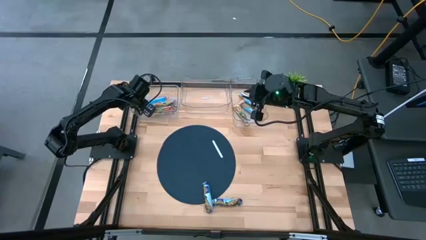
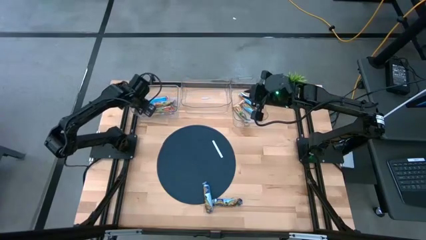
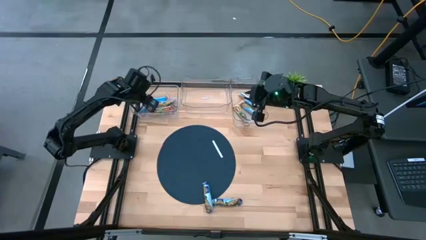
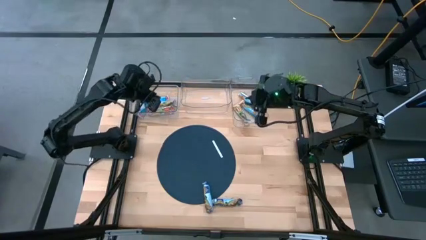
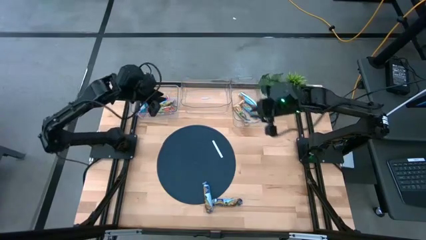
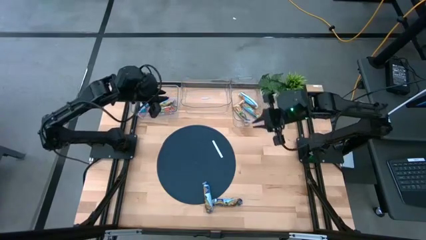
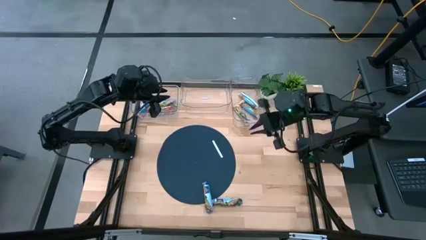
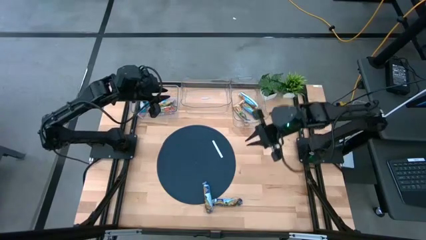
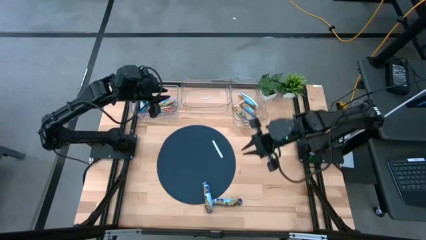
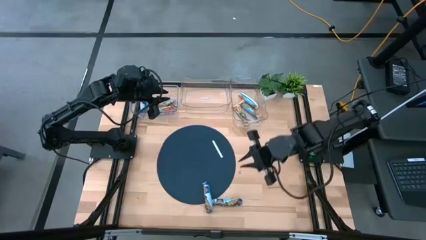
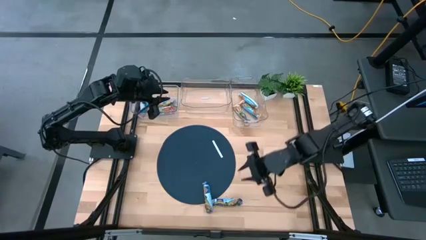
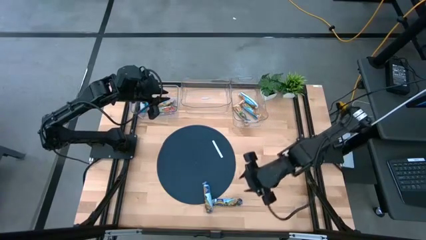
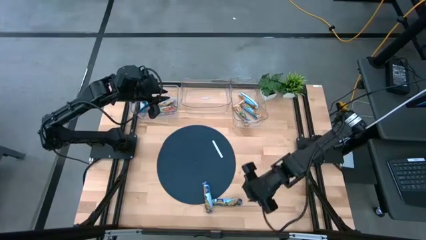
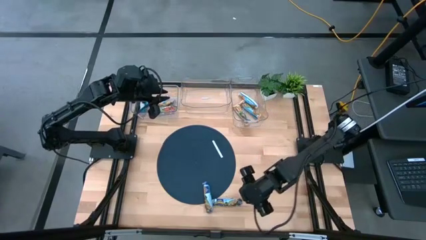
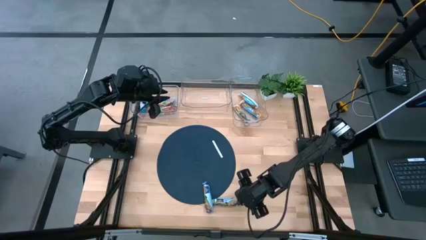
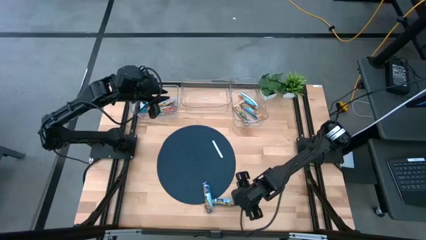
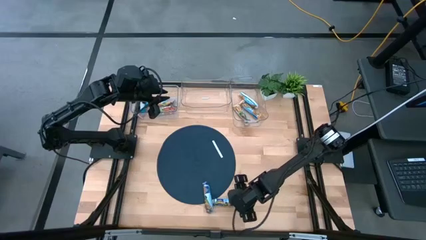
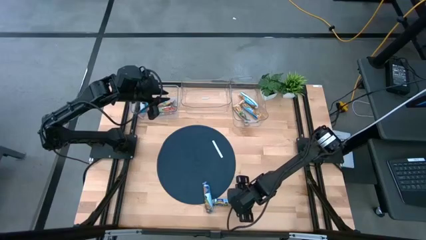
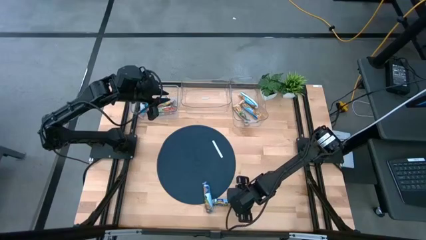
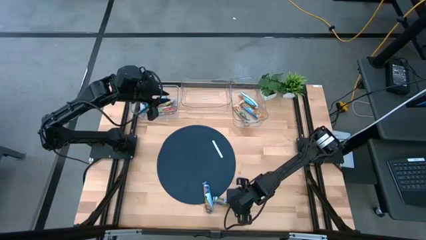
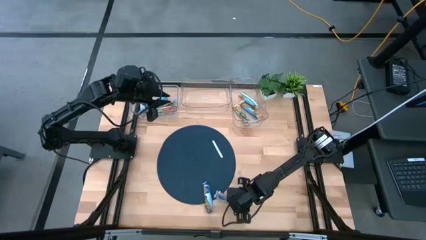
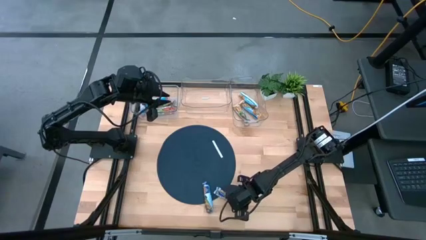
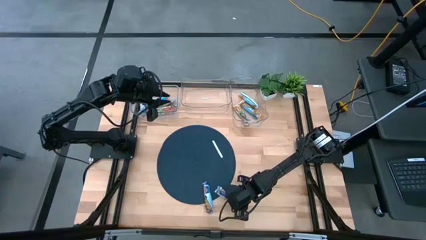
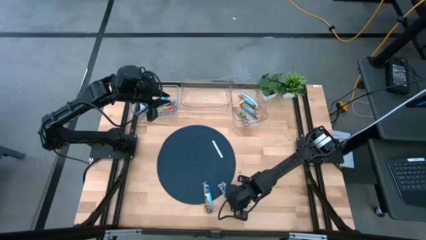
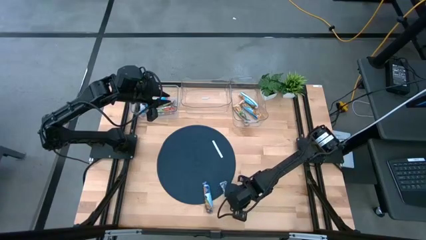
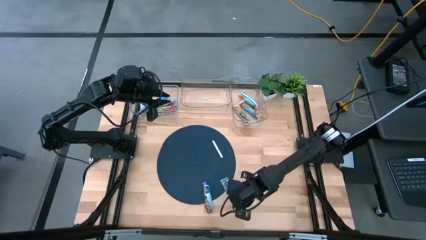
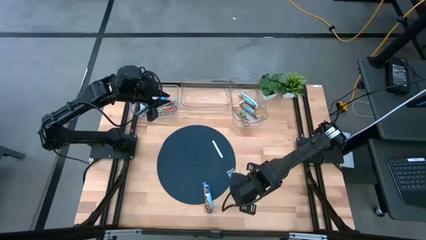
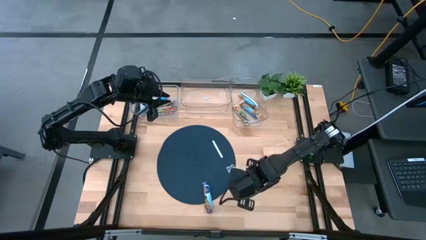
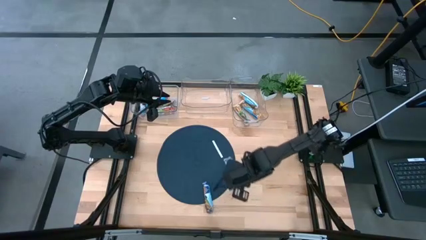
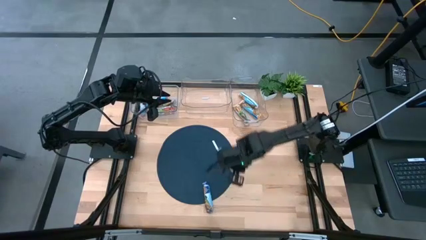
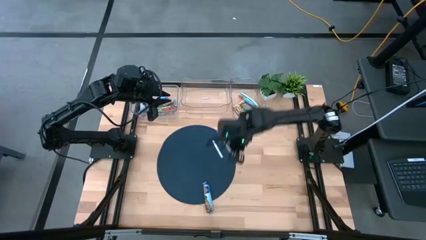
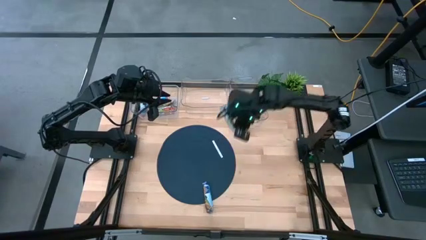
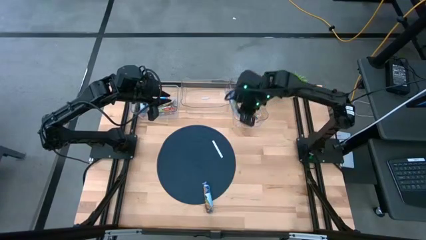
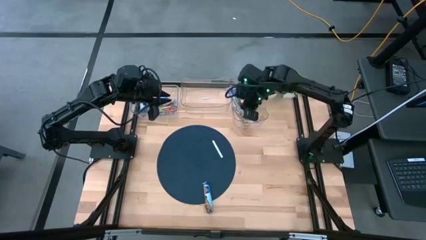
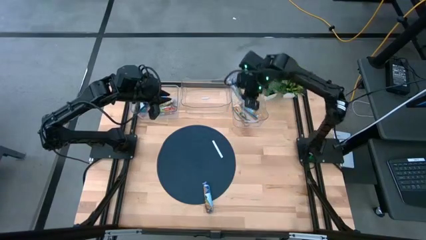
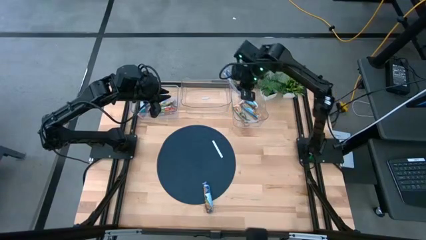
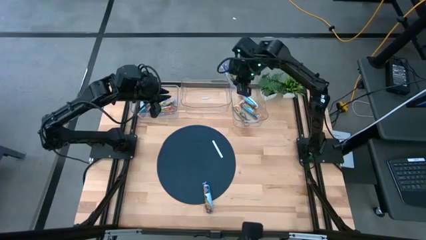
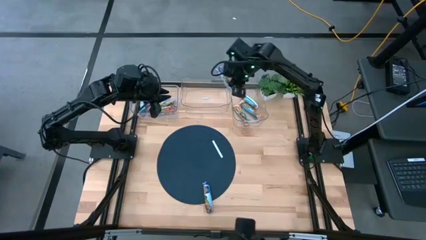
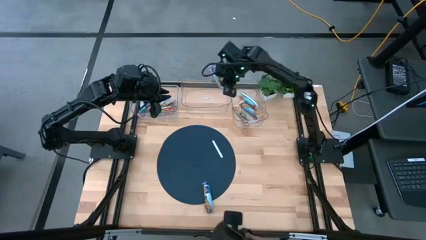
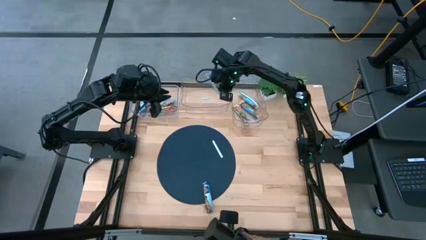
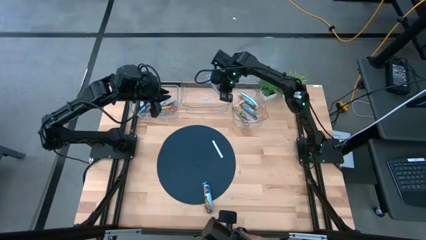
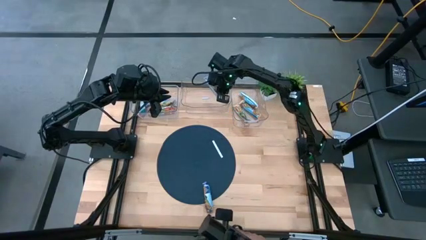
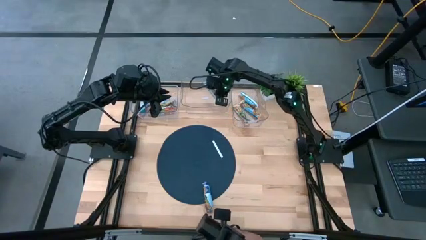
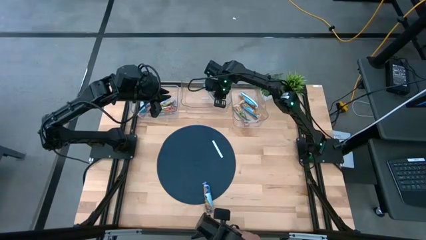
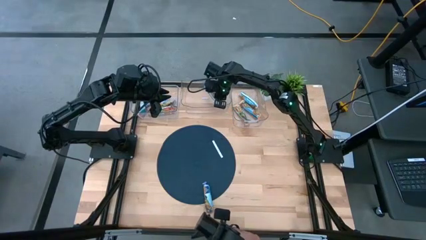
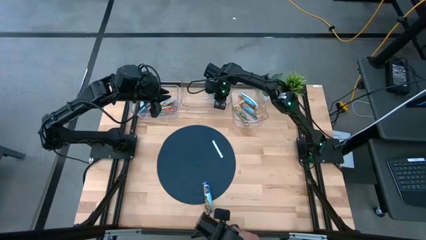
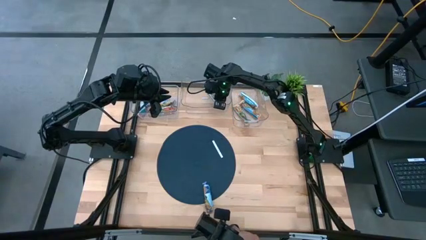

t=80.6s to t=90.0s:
Task: Pick and place Granola Bars by type
Put the right blue chewy bar into the top center transparent bin

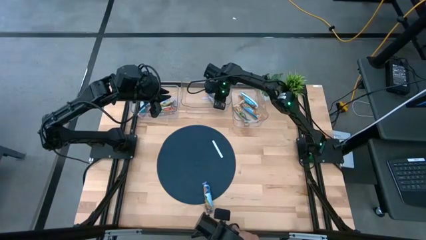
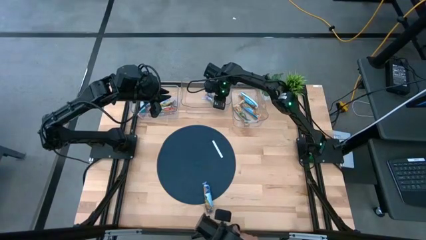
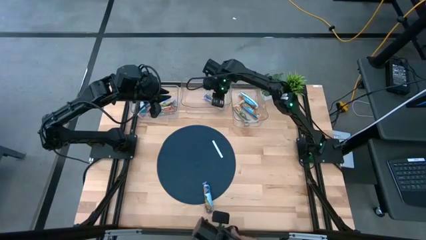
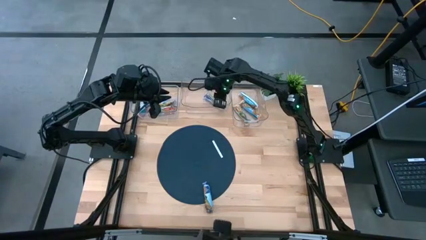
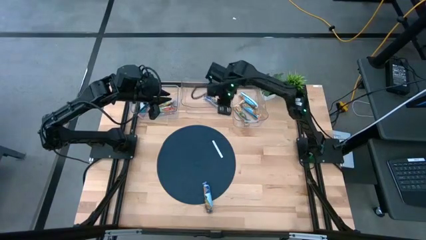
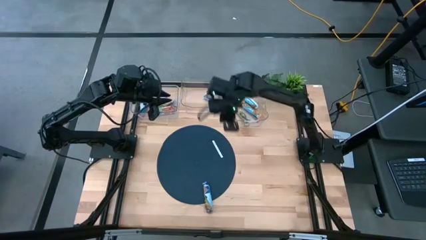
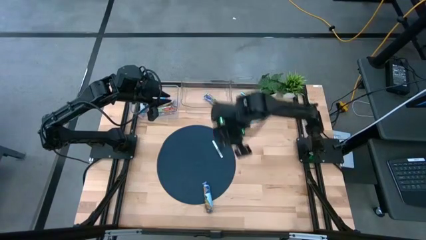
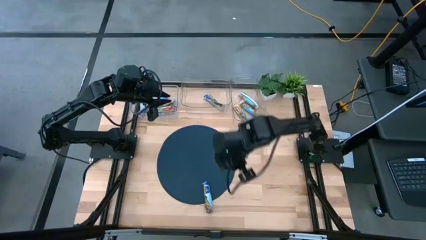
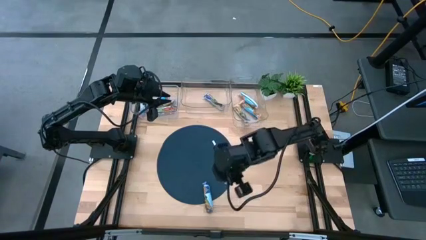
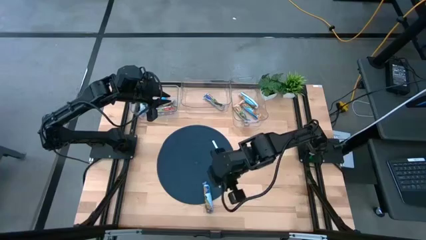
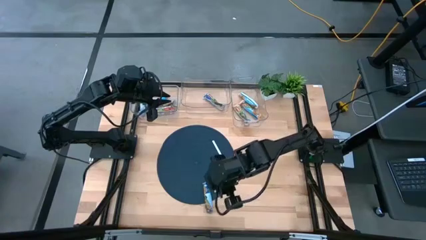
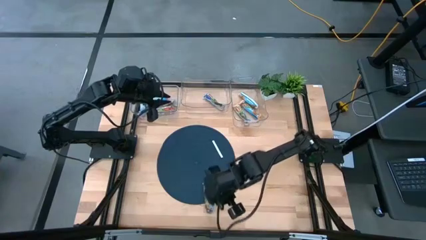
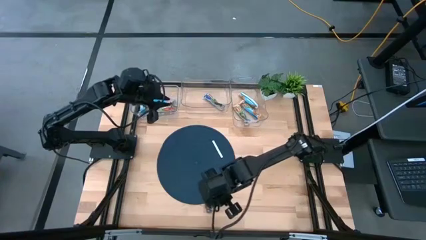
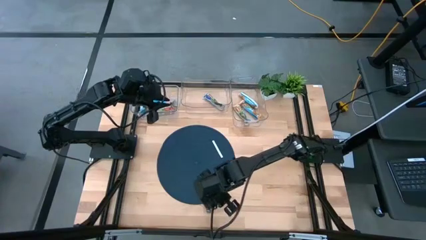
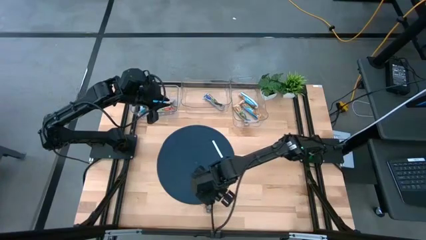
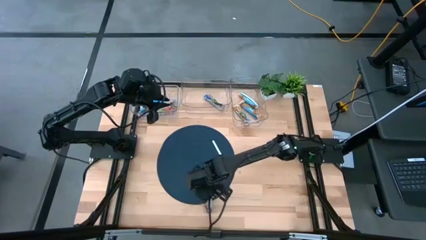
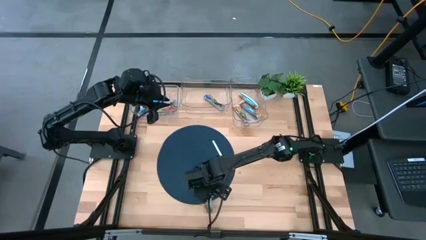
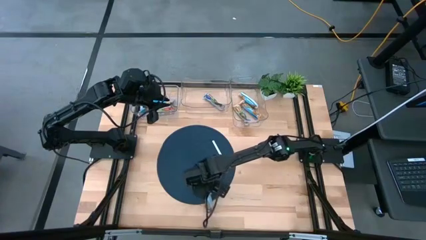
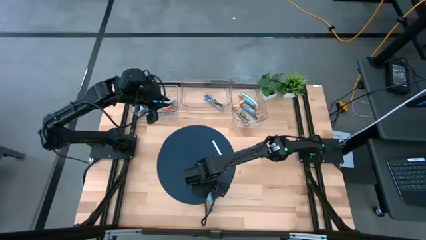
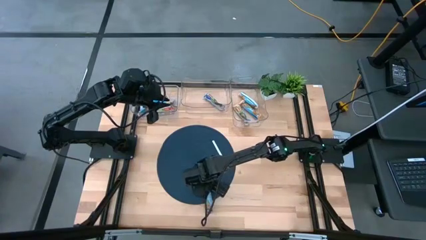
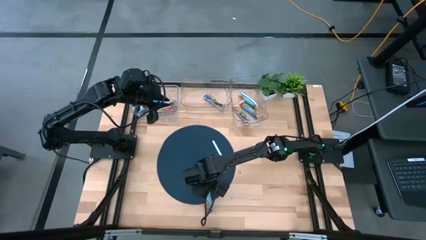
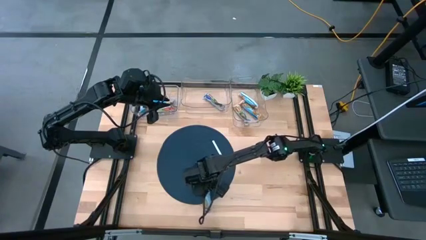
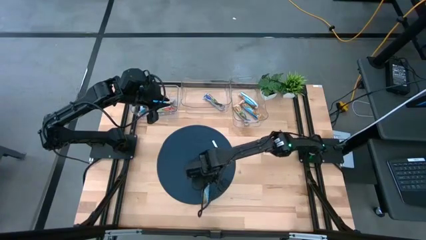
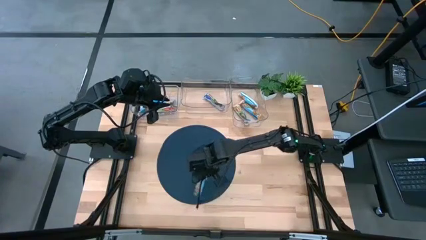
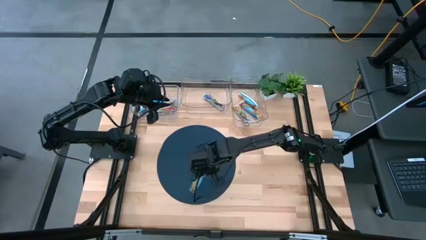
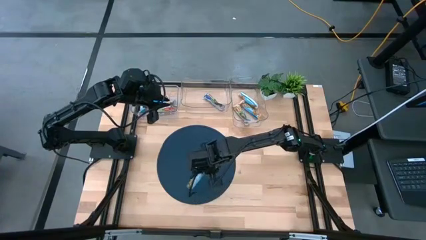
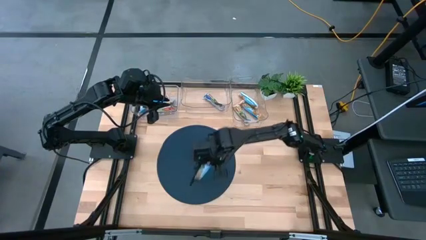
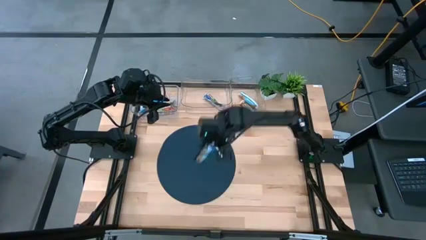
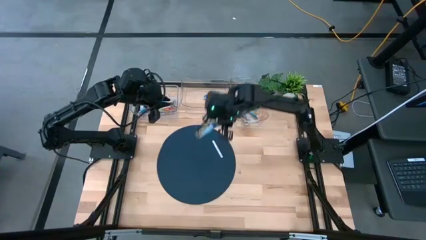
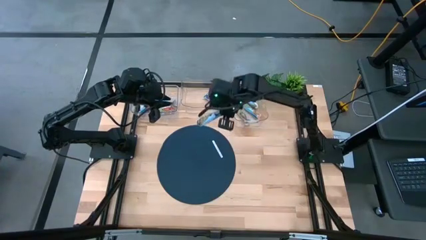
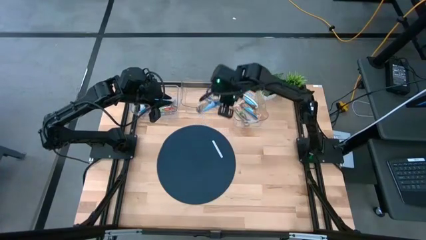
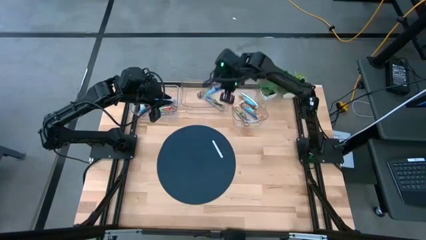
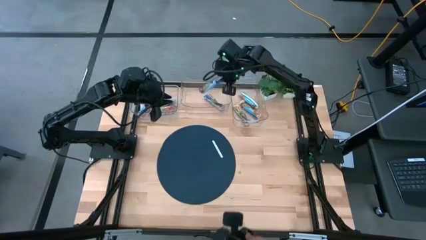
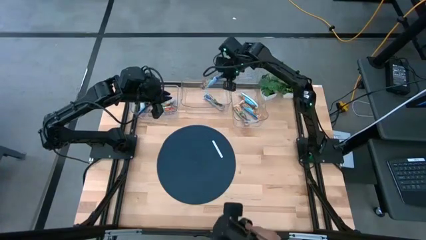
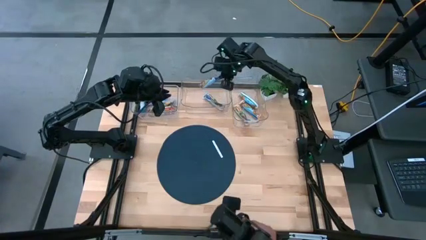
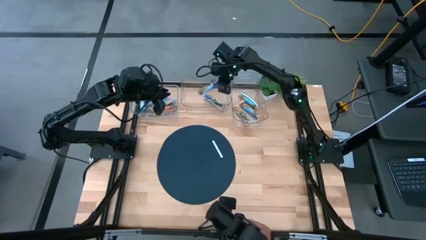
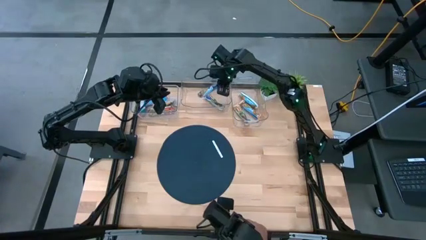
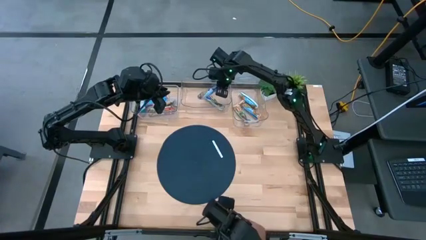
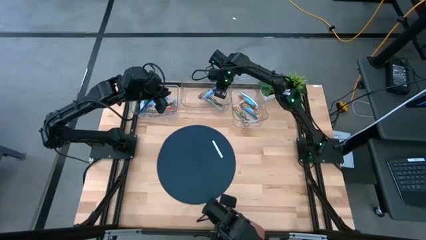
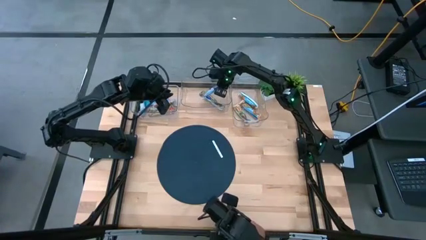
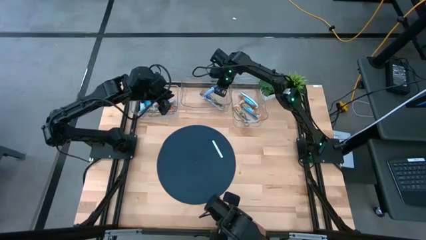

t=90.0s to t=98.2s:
Put the blue chewy bar into the top center transparent bin
